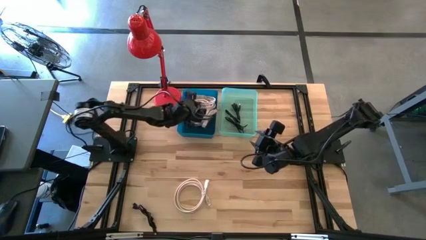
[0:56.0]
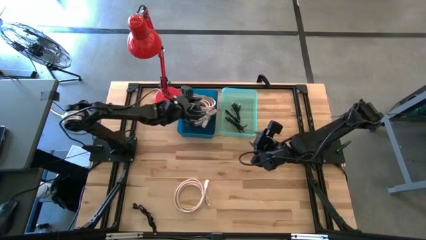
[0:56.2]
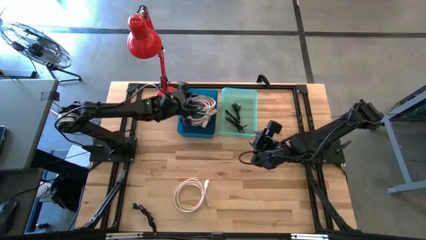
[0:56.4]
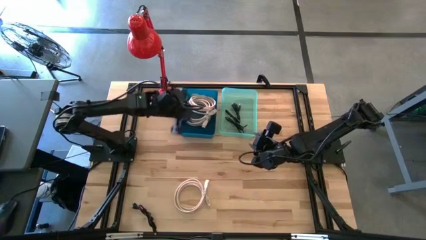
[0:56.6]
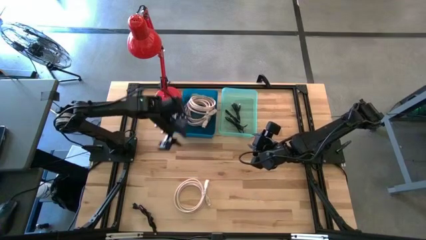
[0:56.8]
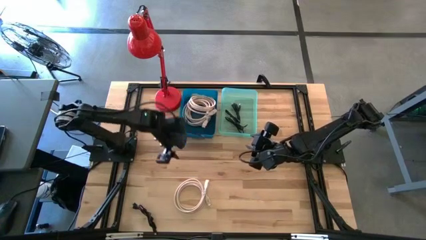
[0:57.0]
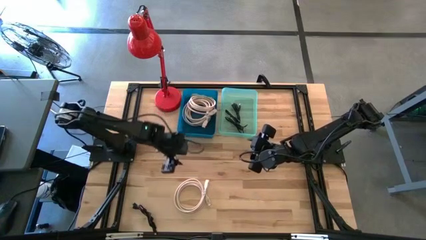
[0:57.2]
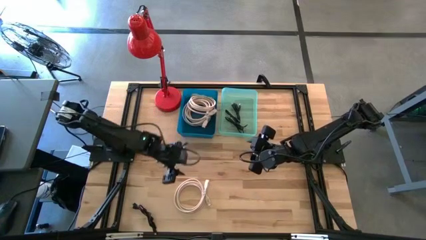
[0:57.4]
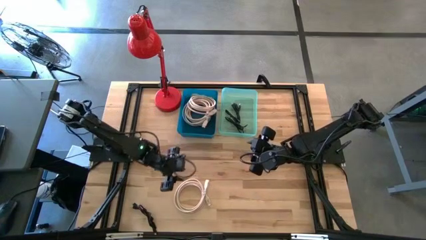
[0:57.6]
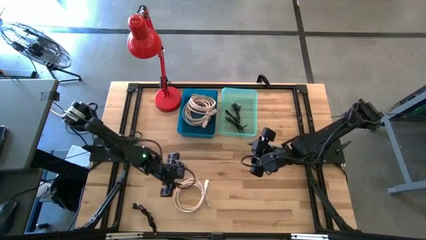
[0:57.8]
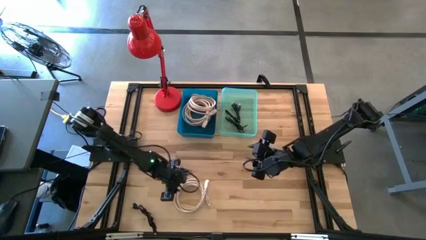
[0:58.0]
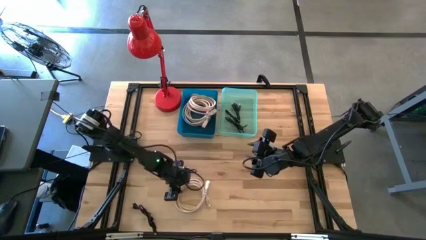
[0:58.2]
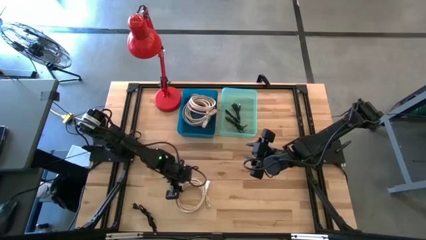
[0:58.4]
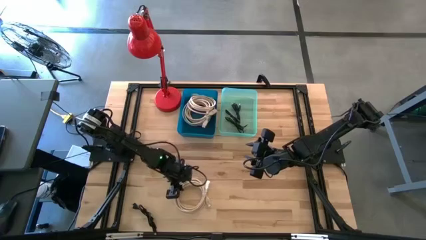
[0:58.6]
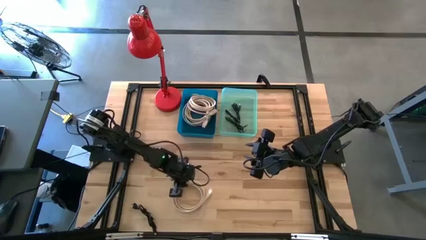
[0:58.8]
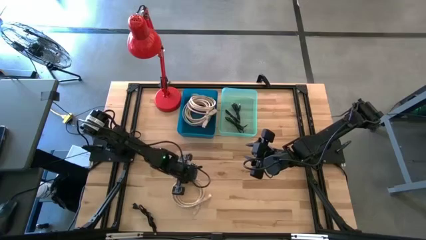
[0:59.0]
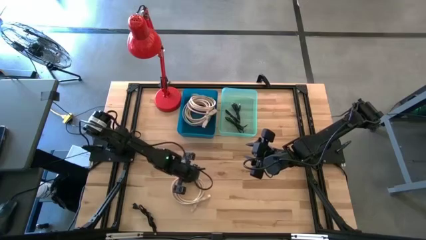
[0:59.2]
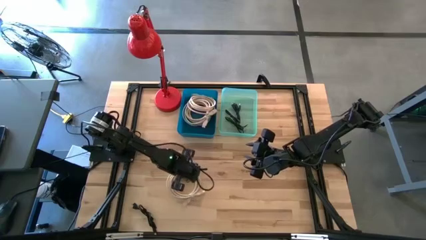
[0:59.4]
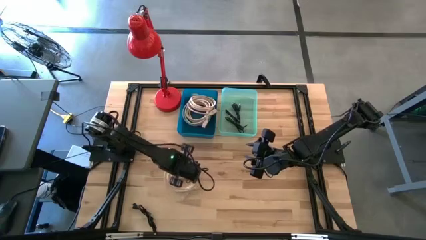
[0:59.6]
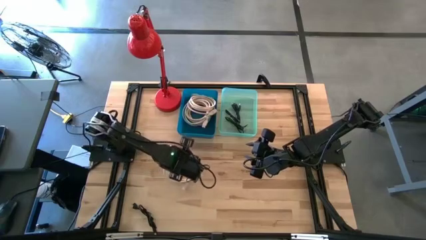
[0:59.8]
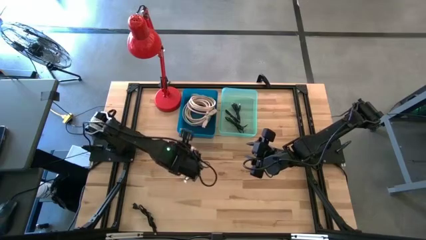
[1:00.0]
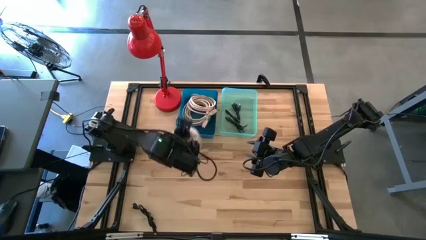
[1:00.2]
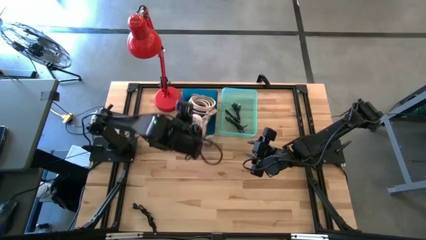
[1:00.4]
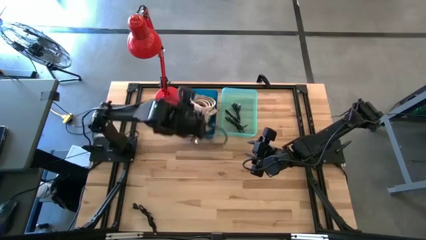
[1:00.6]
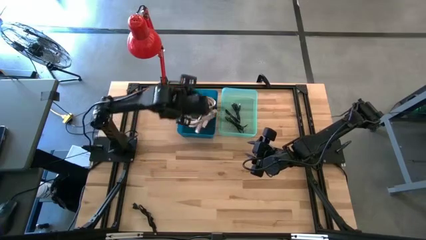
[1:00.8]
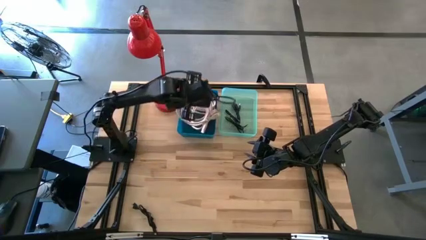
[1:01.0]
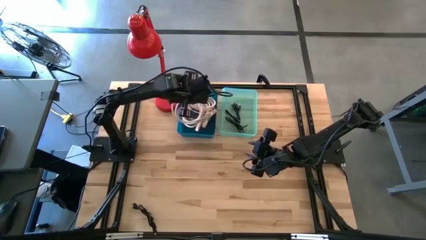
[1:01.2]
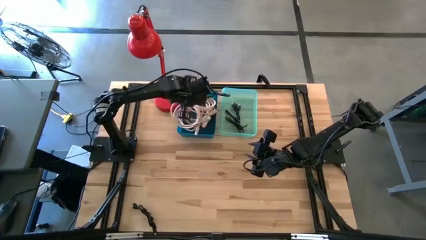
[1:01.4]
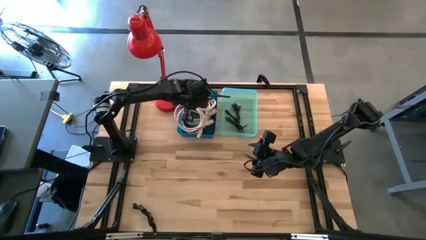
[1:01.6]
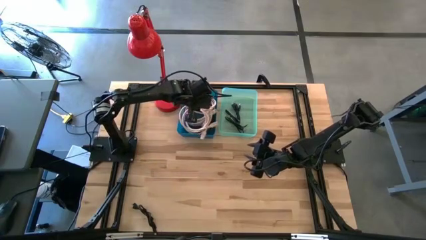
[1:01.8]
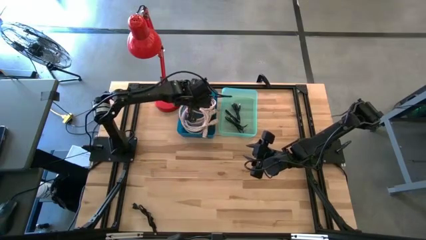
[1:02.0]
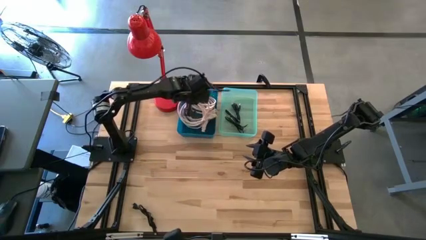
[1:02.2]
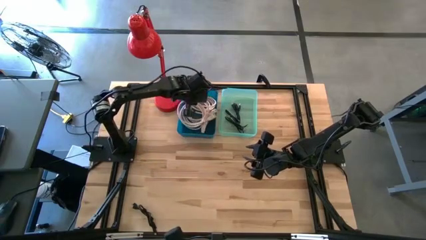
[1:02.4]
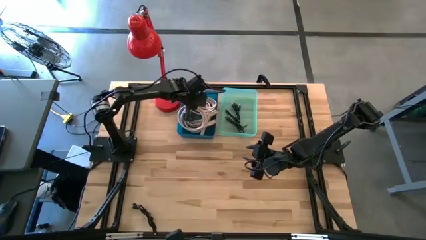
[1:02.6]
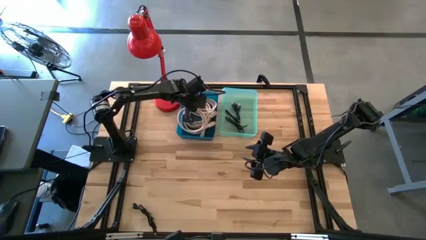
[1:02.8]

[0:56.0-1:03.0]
Task: Pick & Place USB Port
Put the white HDMI cable into the blue bin

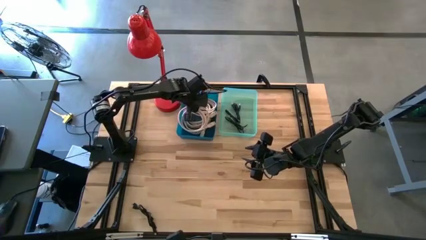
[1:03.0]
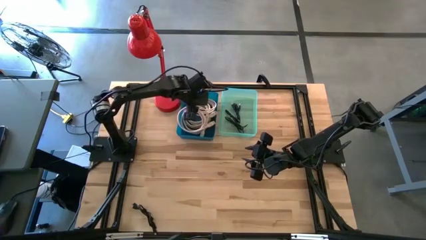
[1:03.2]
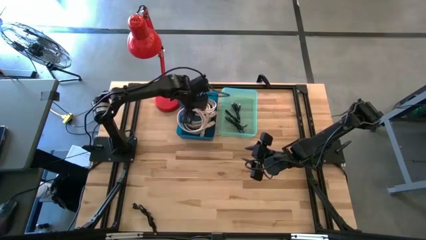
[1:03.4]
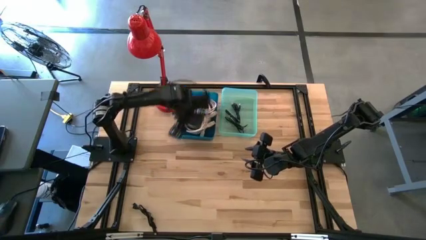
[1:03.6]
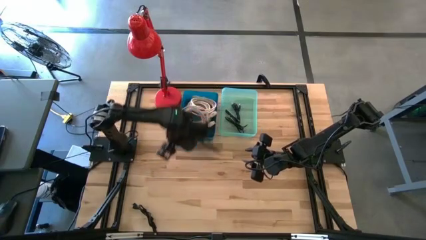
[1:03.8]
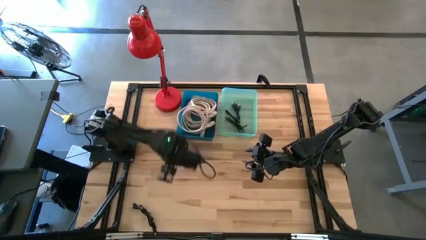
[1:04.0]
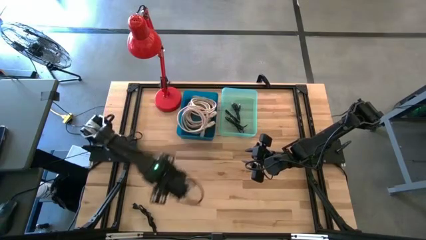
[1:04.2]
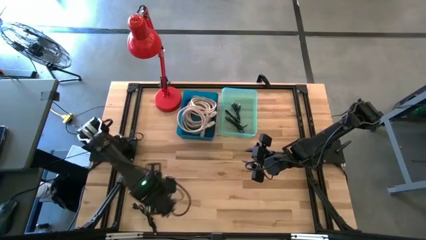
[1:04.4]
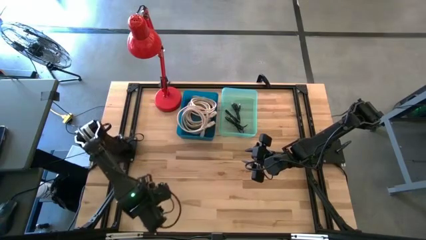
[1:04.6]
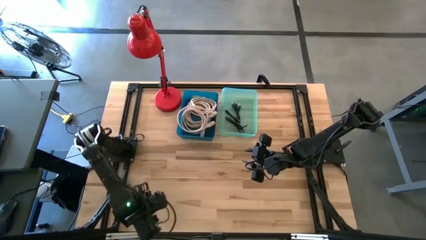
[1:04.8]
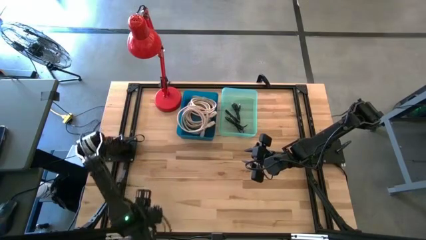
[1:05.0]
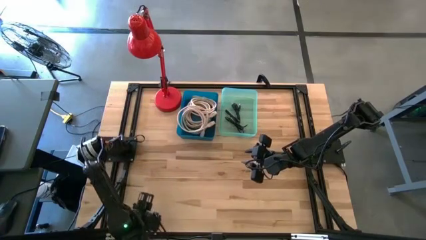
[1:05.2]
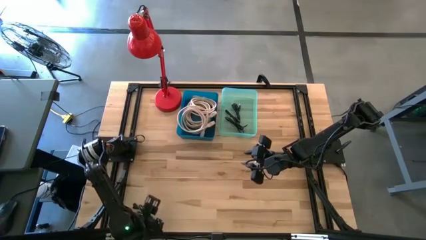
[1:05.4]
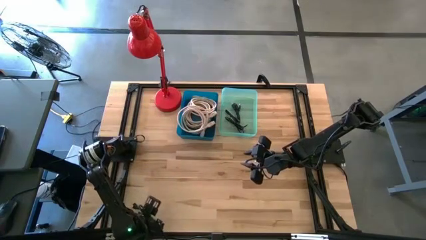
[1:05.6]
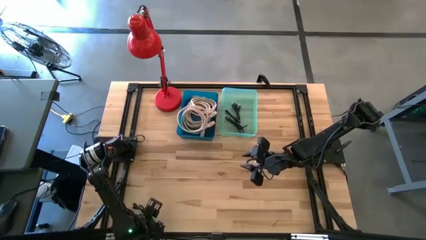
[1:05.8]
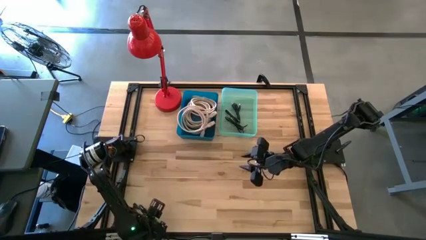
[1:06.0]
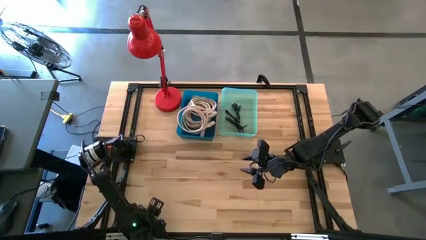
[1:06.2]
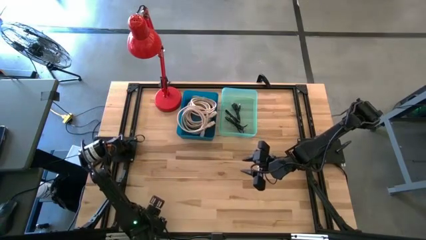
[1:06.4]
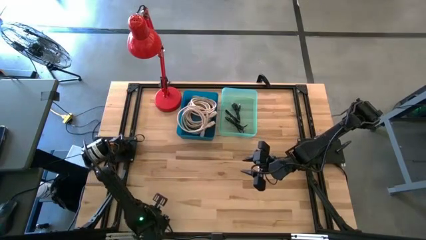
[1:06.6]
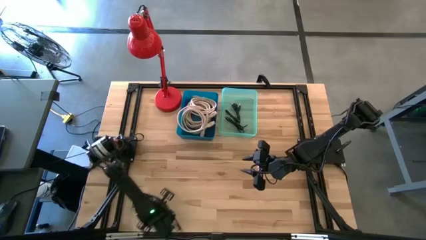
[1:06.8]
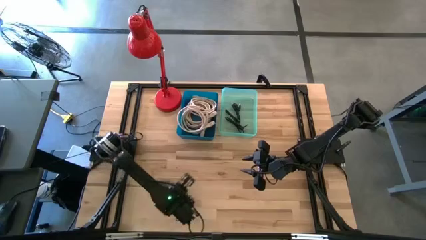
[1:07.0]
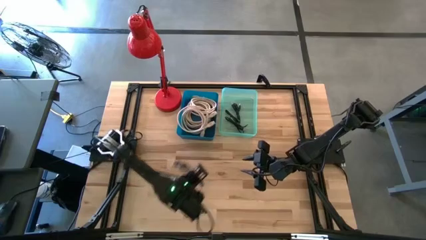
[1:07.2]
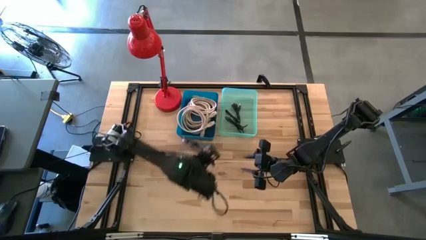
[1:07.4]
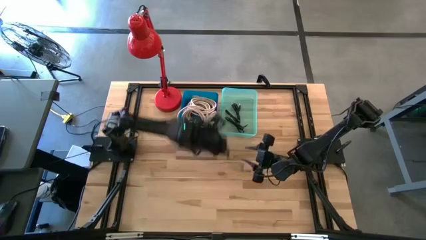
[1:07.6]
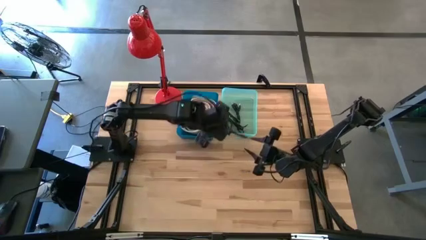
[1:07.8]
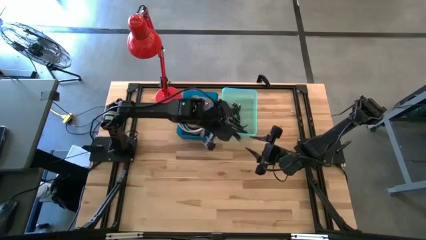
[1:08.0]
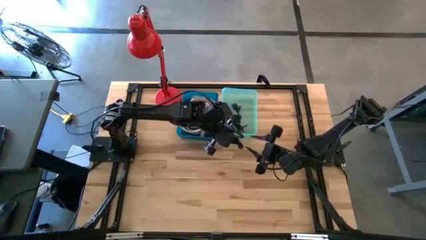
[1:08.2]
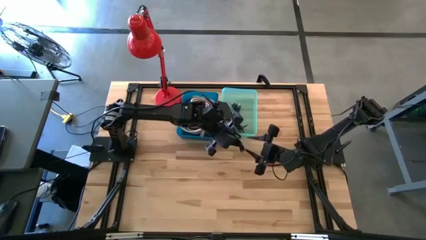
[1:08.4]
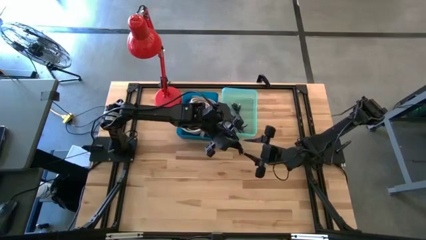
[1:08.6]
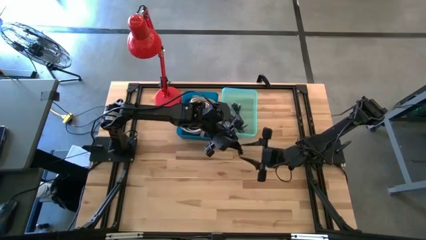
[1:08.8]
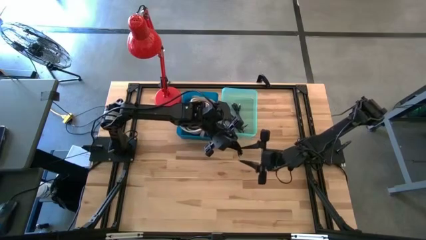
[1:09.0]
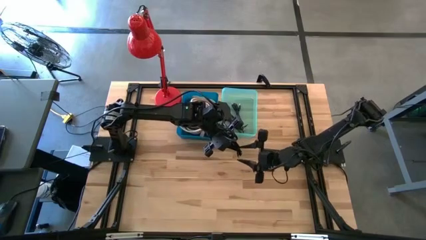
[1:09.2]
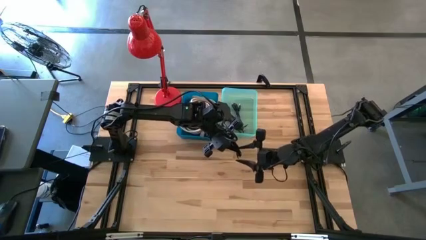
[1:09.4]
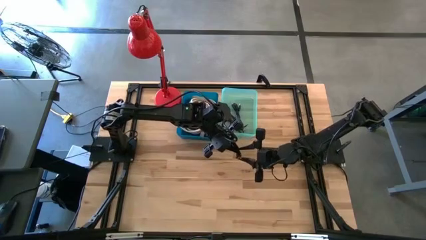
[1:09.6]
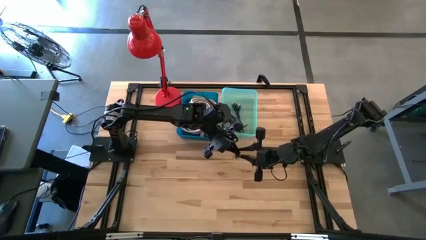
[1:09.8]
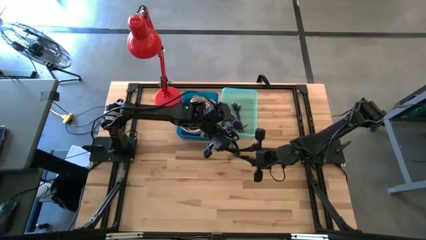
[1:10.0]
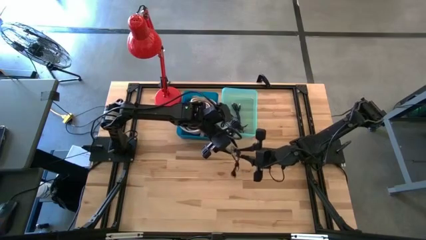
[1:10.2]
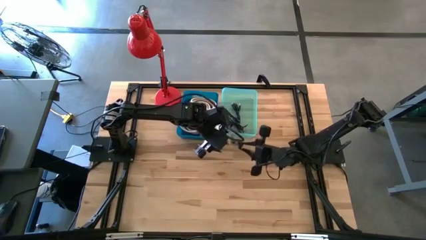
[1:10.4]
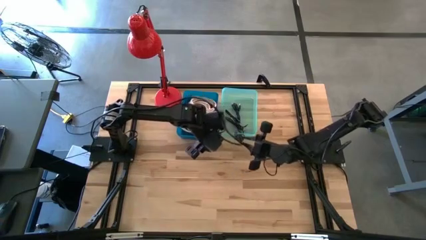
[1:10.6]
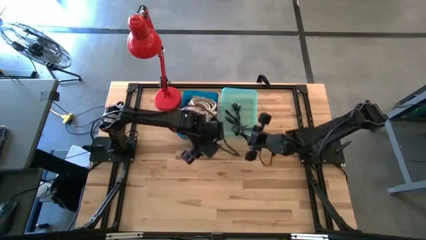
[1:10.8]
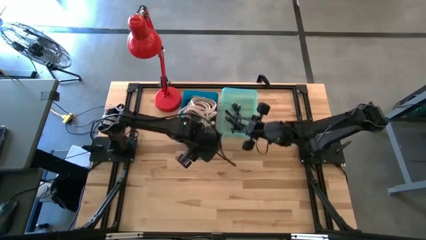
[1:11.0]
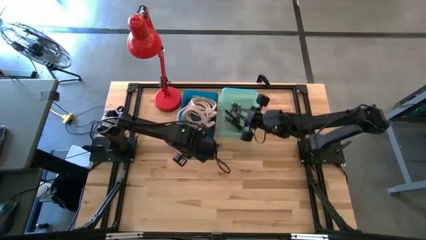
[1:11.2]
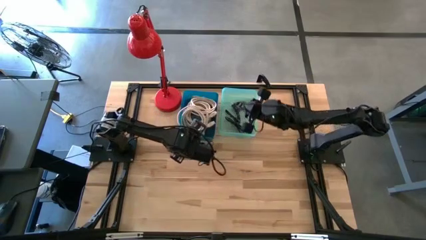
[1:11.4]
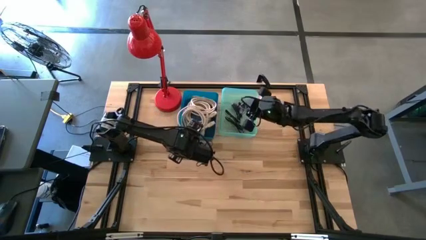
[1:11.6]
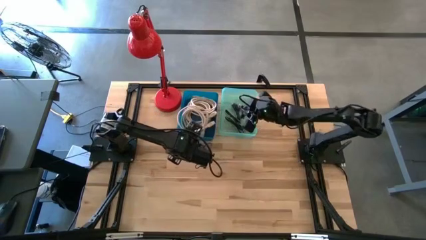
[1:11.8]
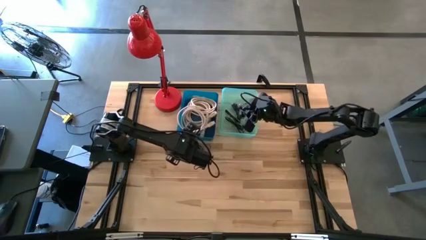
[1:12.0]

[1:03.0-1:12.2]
Put the black USB cable into the green bin
